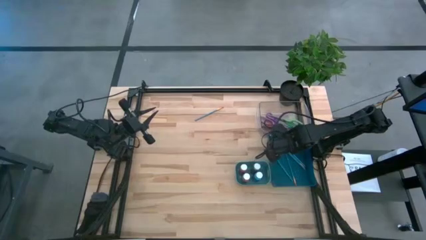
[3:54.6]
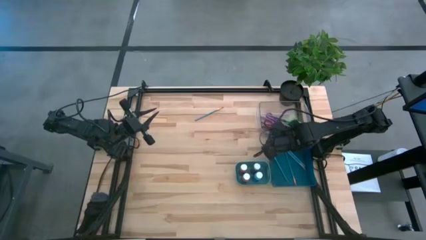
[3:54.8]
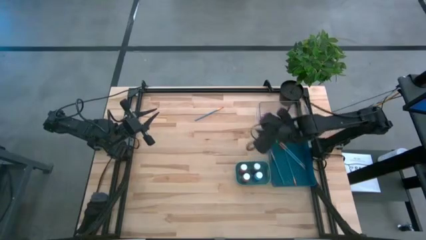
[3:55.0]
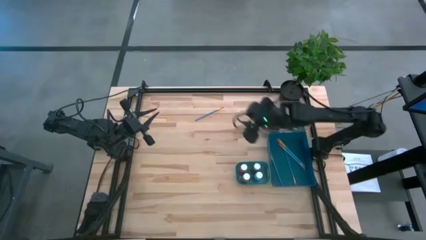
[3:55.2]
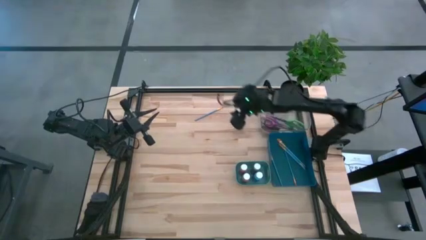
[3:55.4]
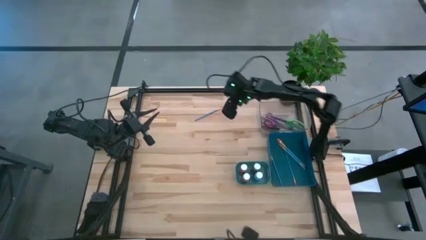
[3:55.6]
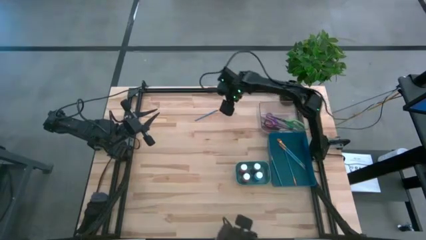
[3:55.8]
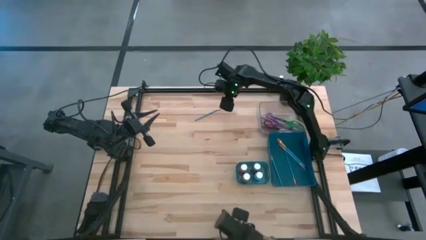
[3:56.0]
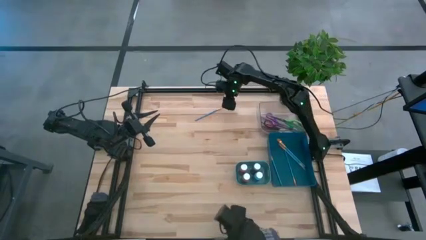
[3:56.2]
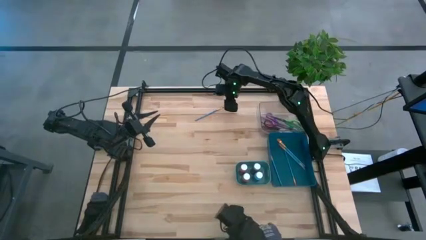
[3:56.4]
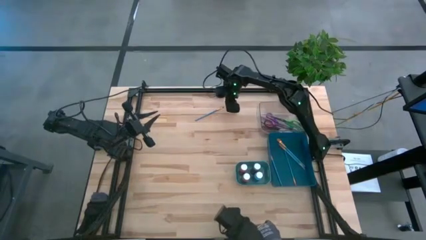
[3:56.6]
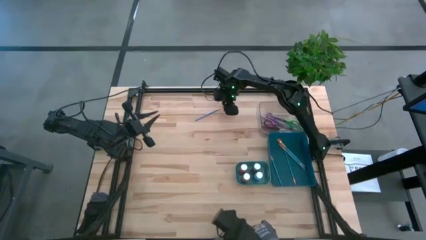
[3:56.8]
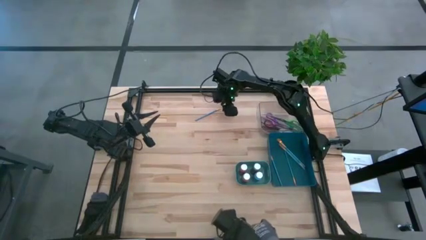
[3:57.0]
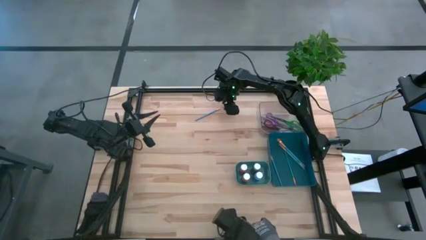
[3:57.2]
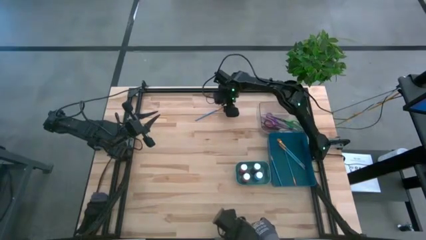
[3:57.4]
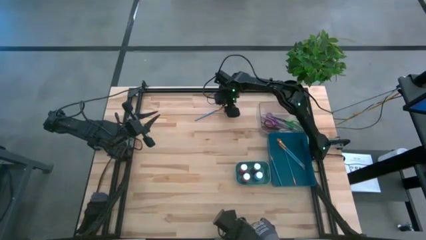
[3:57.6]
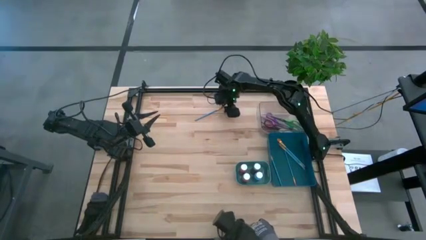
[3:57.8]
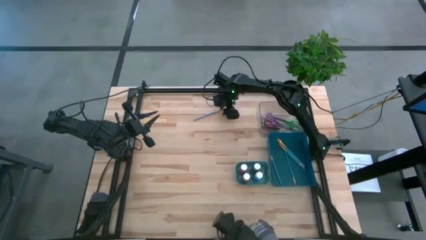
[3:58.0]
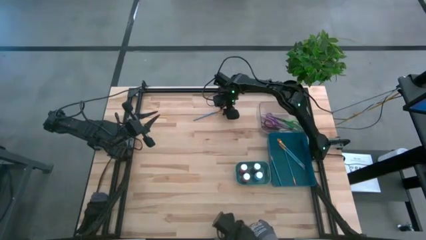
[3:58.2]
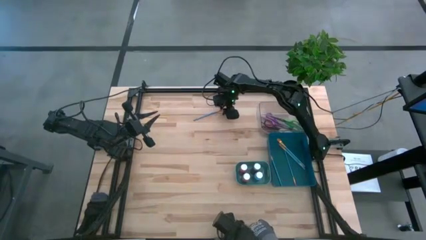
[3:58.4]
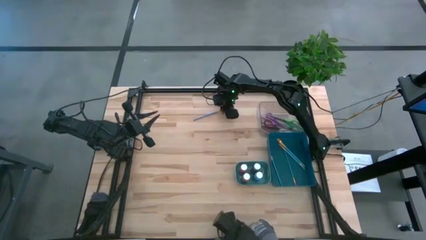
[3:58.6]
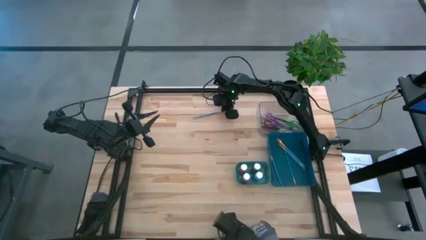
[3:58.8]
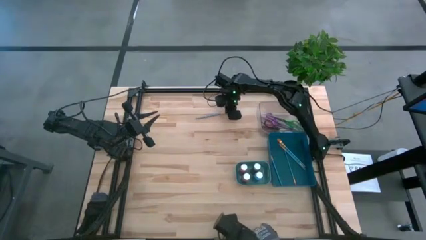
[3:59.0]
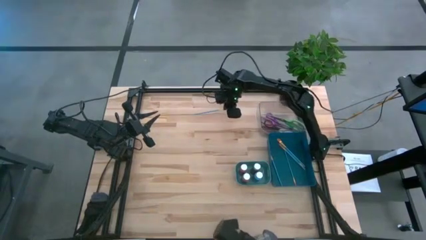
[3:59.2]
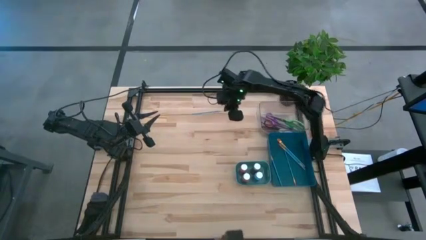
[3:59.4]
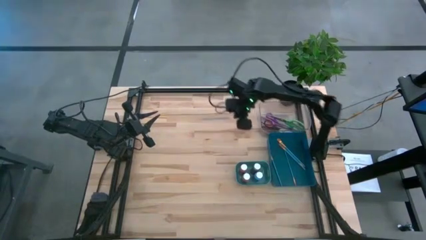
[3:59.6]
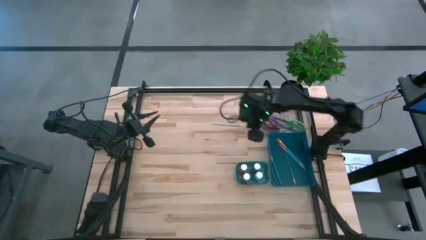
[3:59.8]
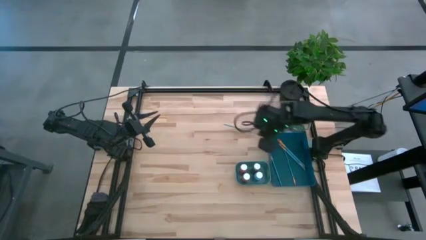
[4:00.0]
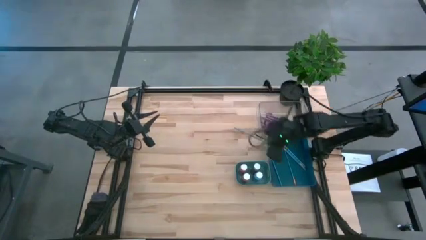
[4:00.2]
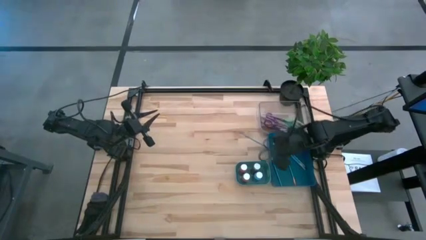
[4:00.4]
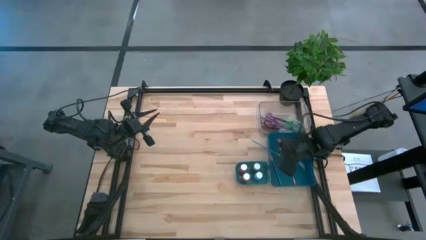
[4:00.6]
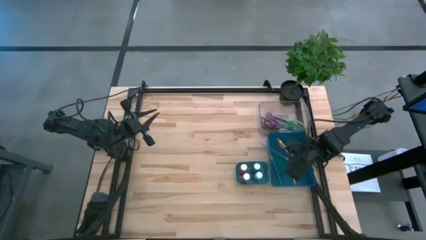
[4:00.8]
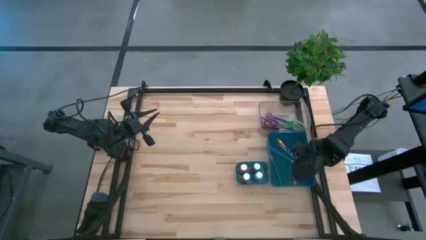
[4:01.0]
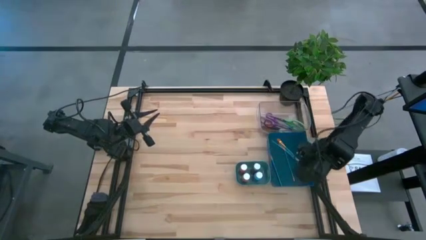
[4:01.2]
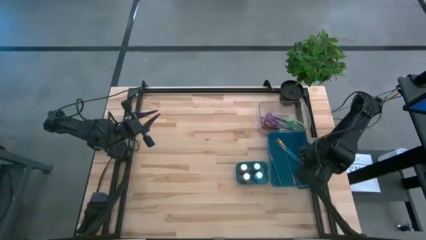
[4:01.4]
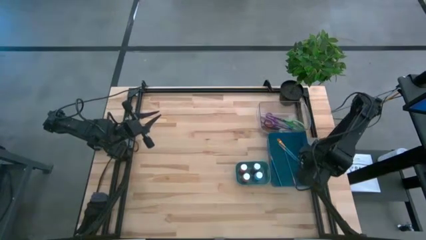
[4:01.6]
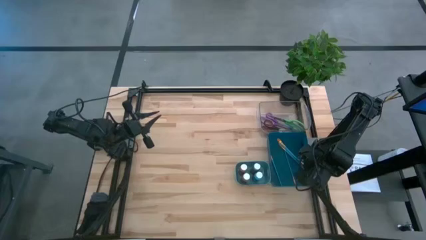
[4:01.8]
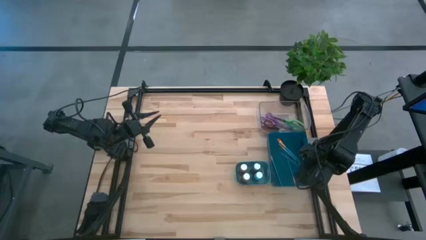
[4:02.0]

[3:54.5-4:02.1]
Task: Pick & Place Paint Supplies
Put the blue paintbrush into the blue bin

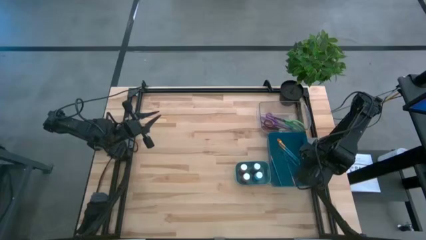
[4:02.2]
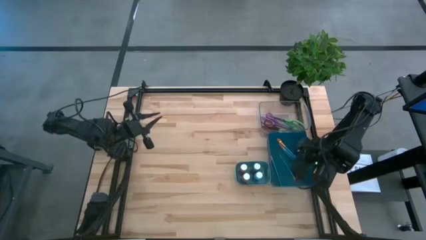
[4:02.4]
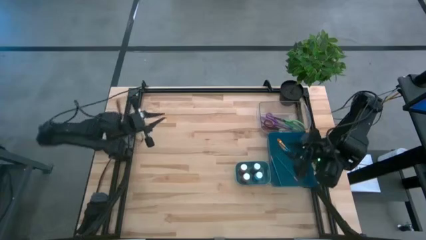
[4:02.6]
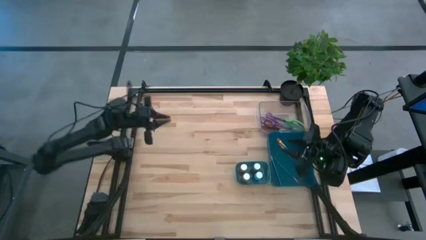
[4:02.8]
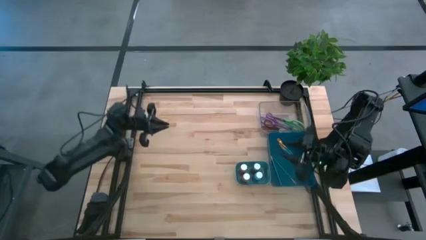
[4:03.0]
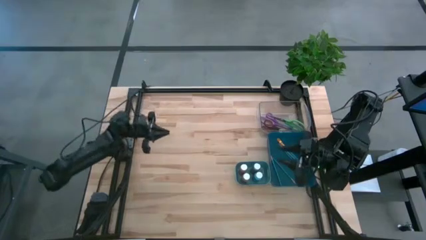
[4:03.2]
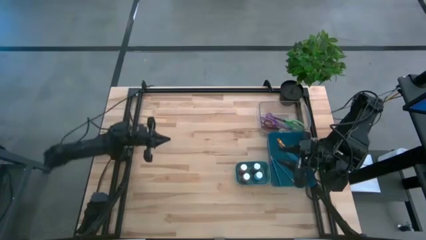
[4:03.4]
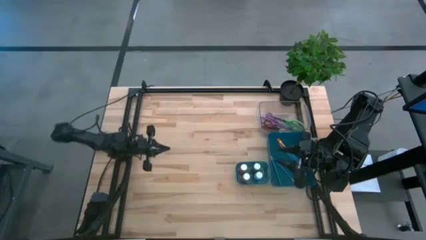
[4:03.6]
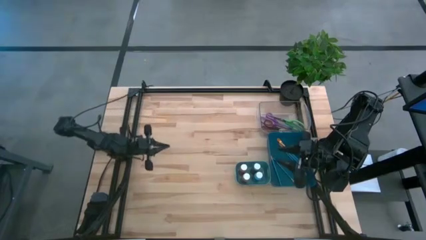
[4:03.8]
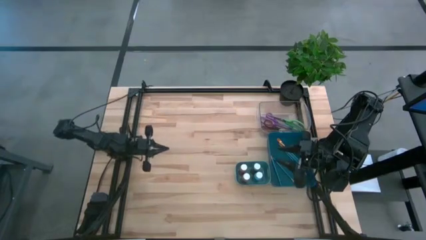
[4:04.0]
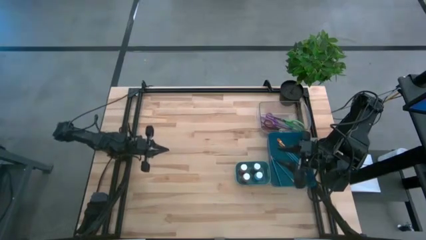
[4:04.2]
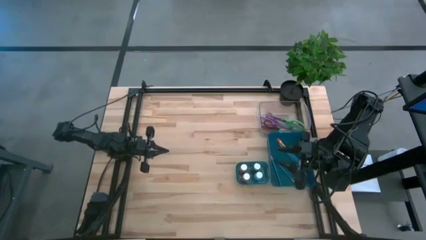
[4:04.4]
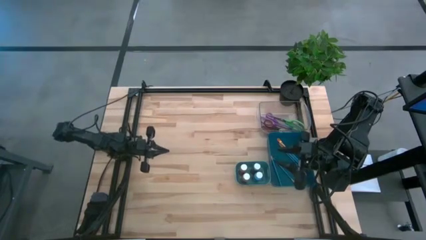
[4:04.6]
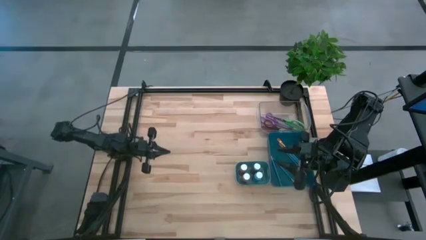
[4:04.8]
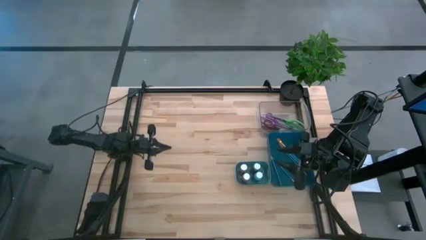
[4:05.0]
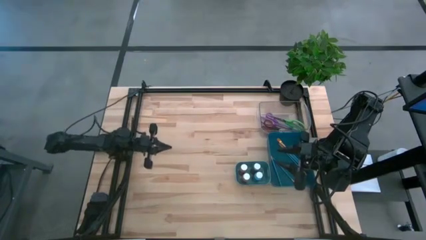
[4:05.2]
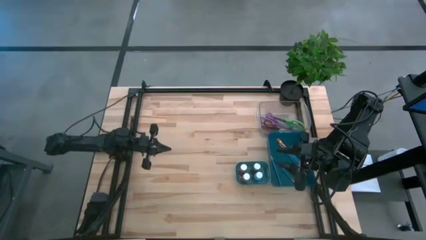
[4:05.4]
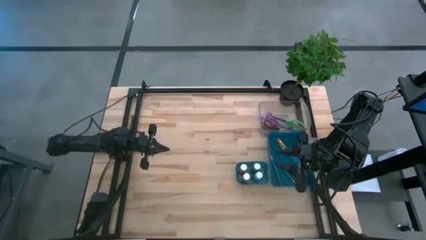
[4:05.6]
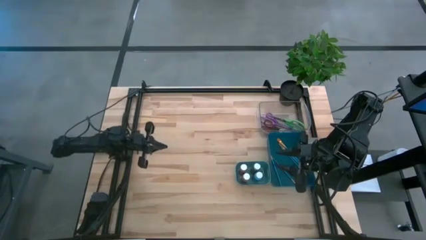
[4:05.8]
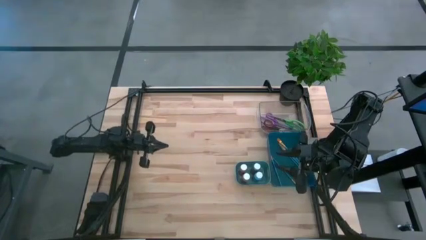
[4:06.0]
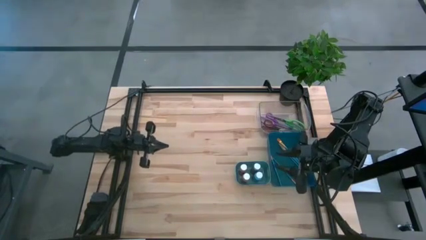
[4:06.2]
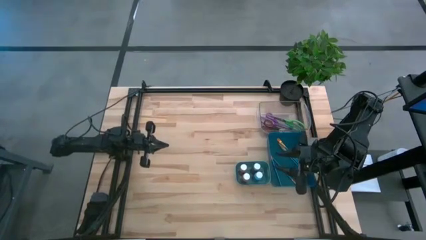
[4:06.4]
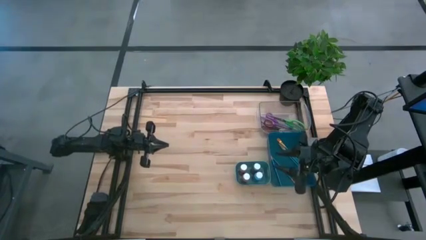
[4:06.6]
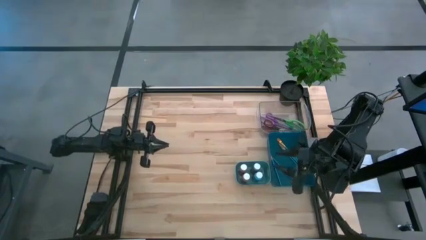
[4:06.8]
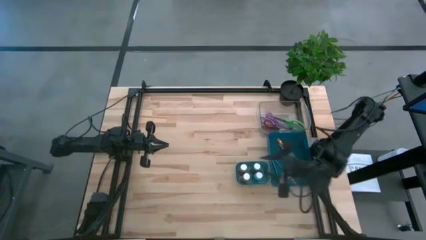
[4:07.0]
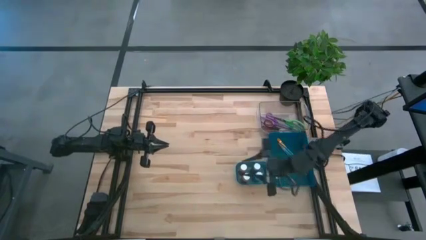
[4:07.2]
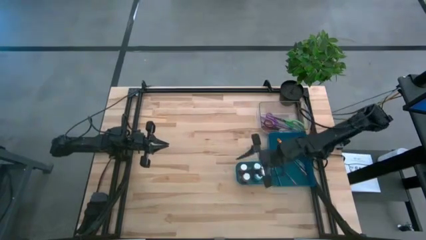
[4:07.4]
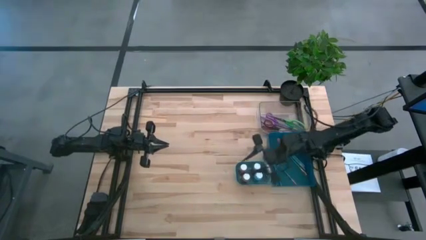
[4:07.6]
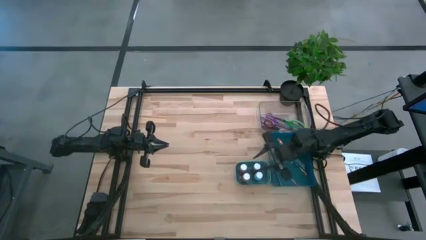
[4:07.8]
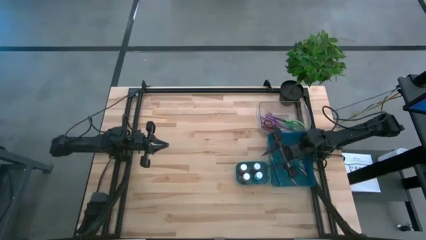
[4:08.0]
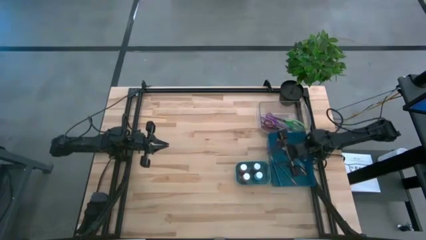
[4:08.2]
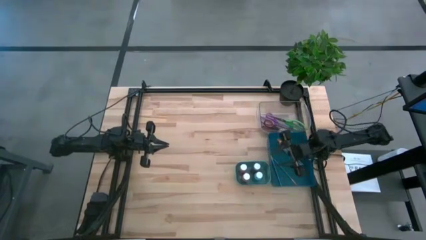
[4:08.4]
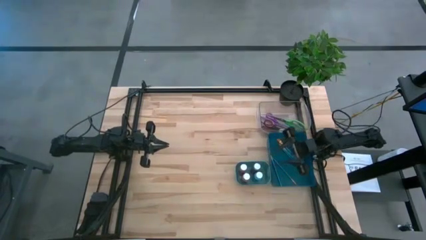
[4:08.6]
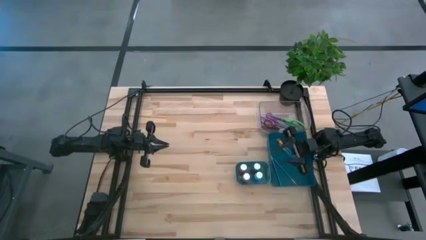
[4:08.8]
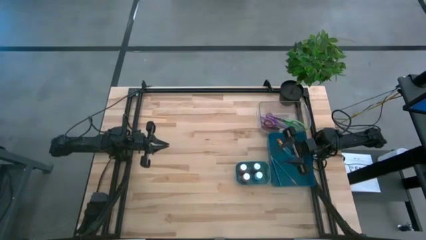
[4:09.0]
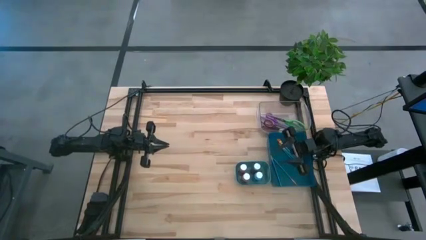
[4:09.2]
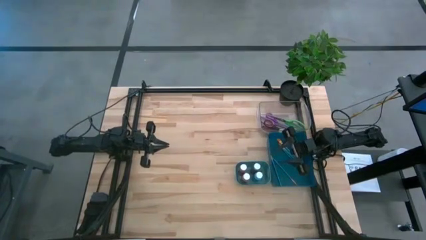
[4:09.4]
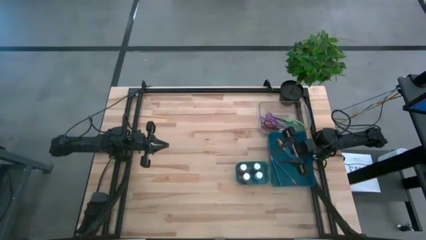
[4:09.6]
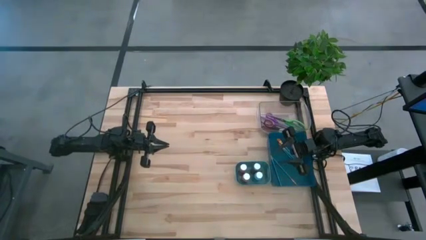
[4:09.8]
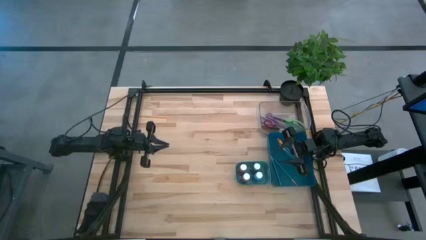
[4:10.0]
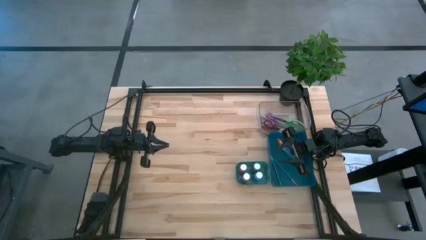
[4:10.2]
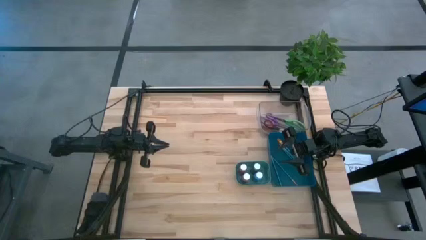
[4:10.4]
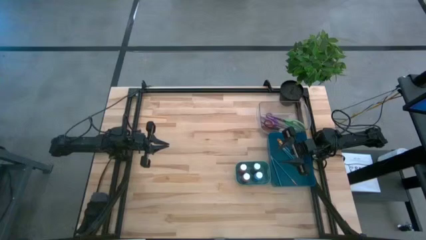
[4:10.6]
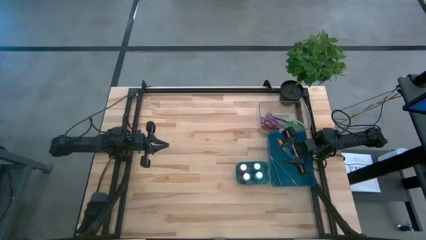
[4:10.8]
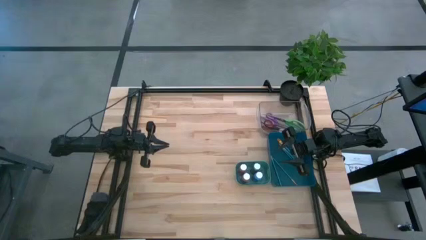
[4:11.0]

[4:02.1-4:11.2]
Return to Home Position
